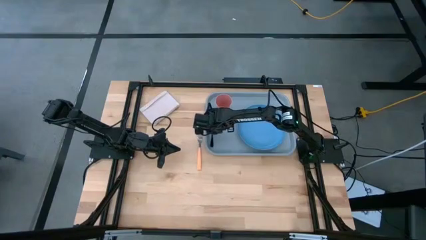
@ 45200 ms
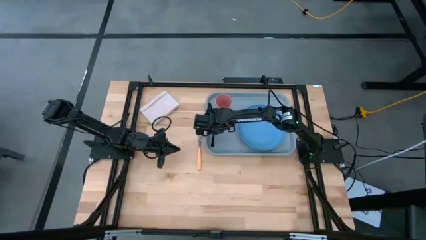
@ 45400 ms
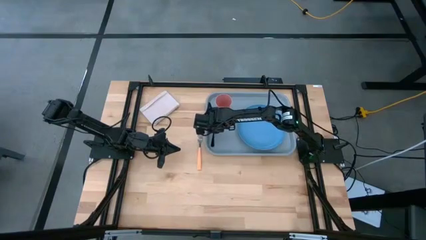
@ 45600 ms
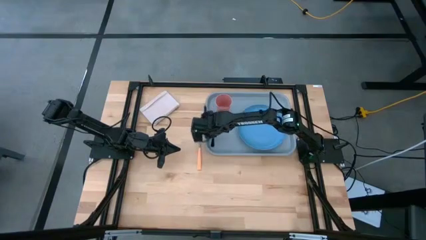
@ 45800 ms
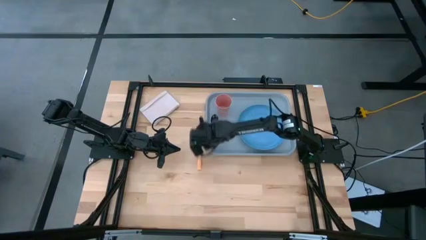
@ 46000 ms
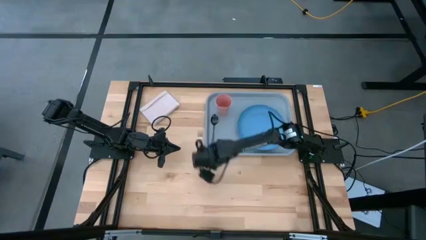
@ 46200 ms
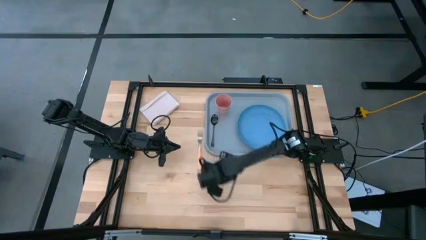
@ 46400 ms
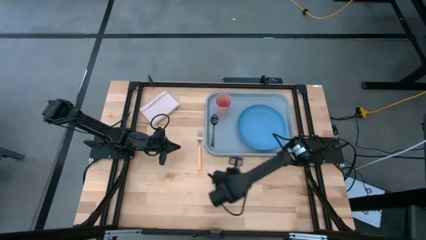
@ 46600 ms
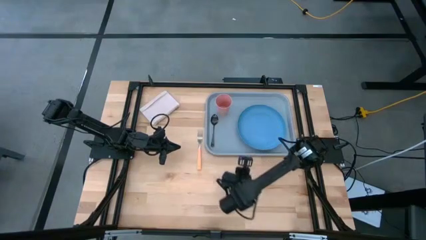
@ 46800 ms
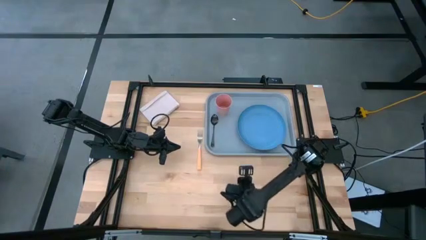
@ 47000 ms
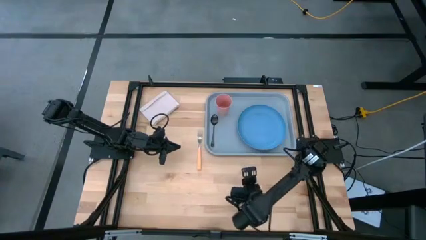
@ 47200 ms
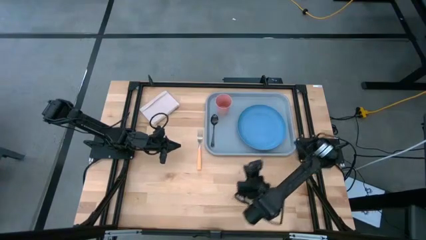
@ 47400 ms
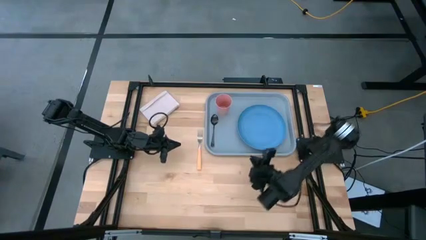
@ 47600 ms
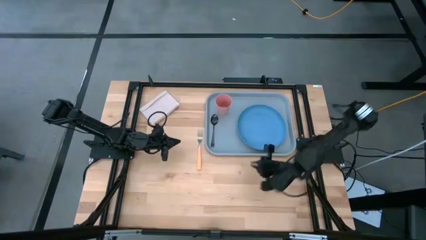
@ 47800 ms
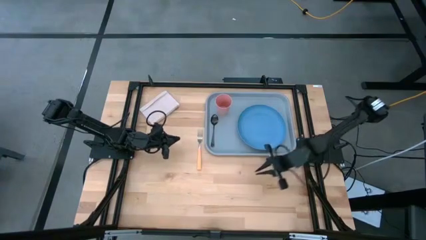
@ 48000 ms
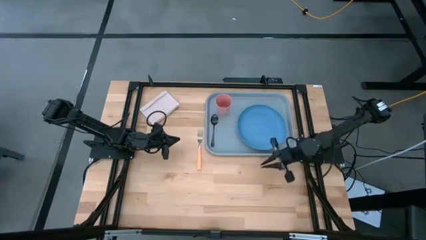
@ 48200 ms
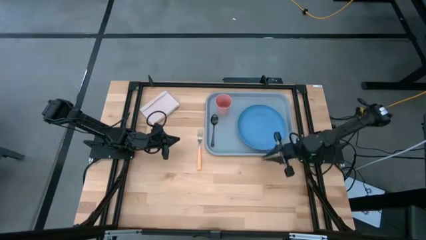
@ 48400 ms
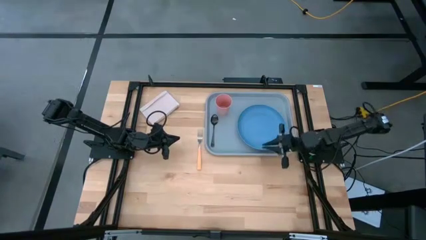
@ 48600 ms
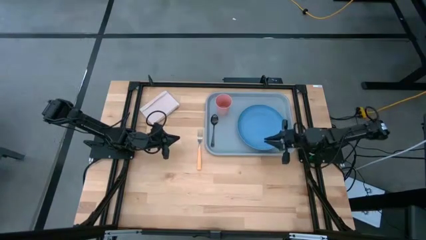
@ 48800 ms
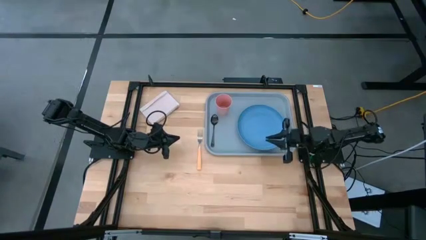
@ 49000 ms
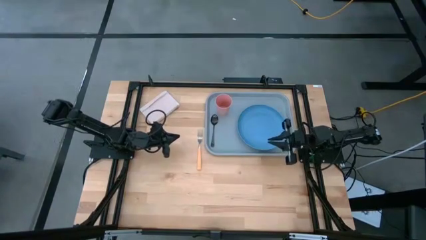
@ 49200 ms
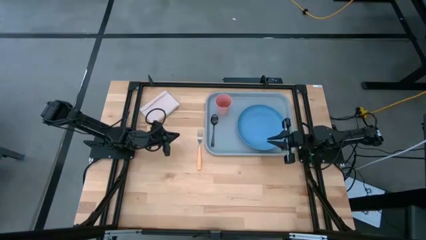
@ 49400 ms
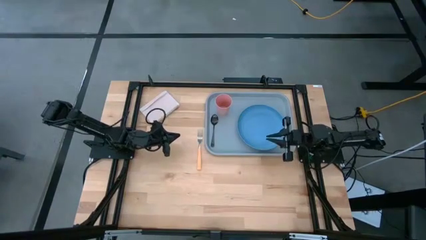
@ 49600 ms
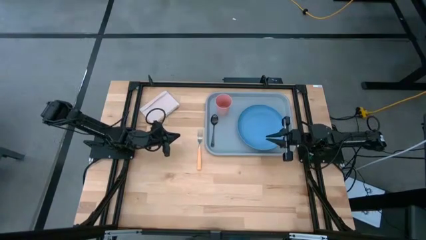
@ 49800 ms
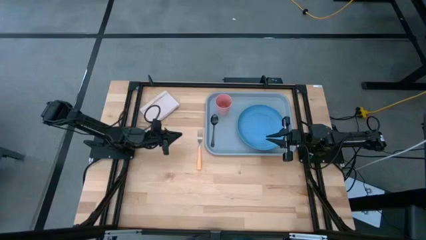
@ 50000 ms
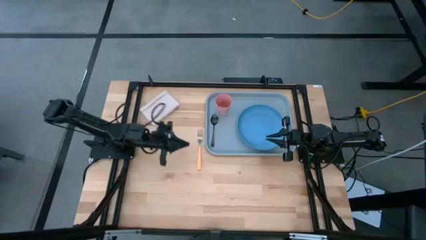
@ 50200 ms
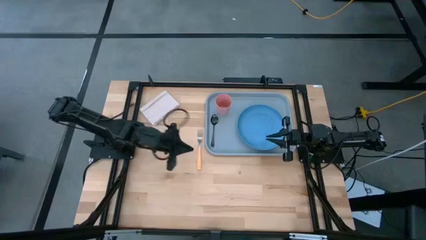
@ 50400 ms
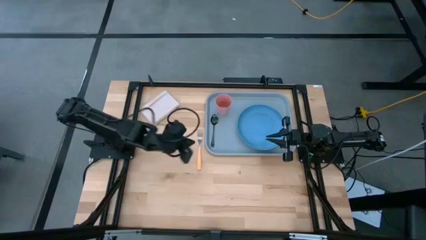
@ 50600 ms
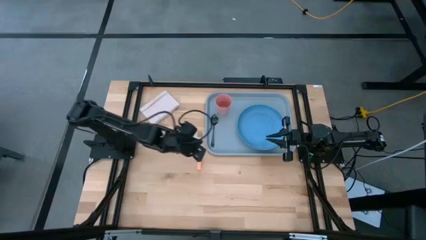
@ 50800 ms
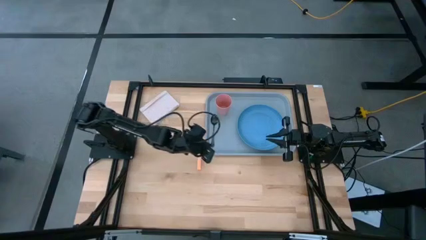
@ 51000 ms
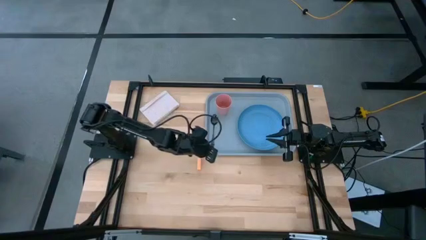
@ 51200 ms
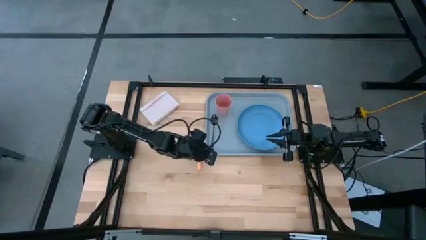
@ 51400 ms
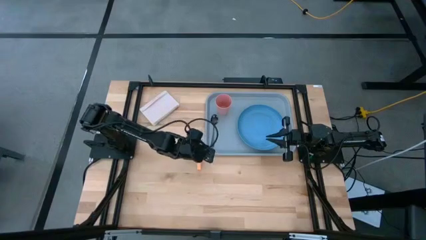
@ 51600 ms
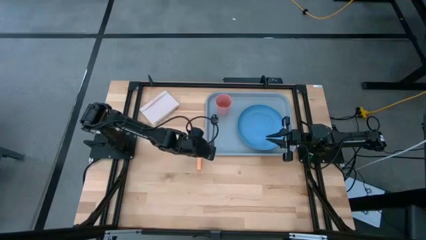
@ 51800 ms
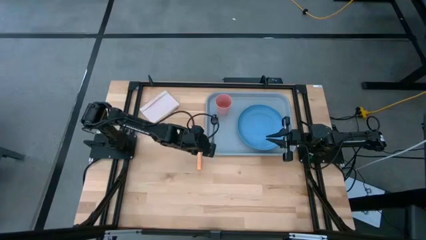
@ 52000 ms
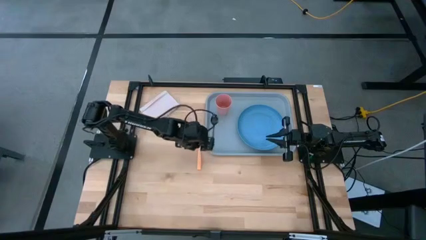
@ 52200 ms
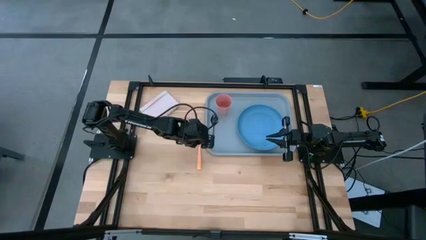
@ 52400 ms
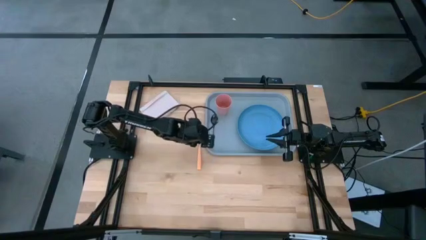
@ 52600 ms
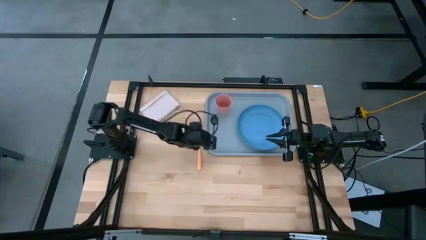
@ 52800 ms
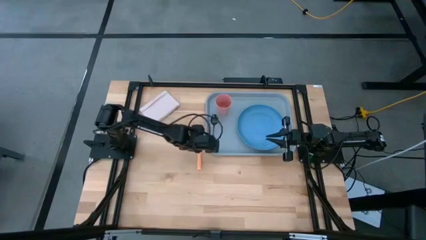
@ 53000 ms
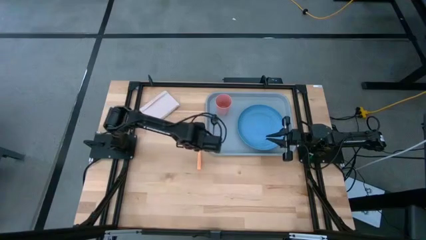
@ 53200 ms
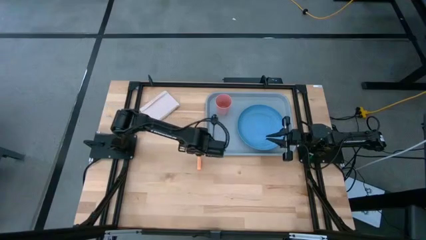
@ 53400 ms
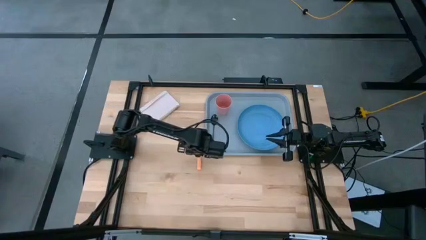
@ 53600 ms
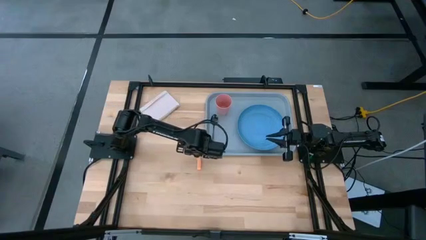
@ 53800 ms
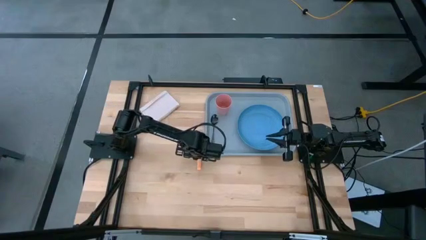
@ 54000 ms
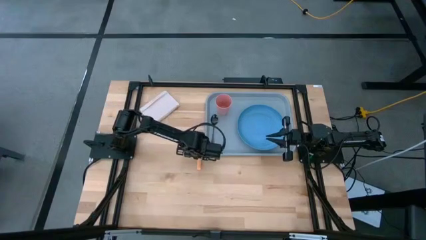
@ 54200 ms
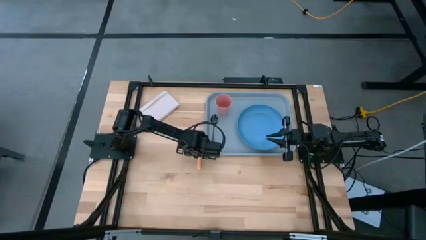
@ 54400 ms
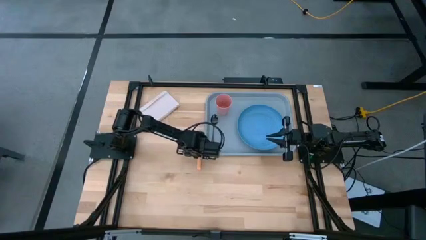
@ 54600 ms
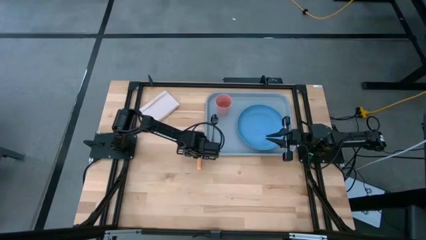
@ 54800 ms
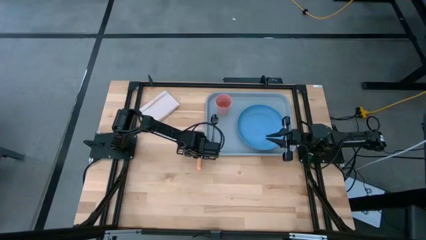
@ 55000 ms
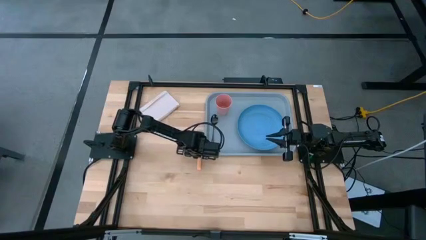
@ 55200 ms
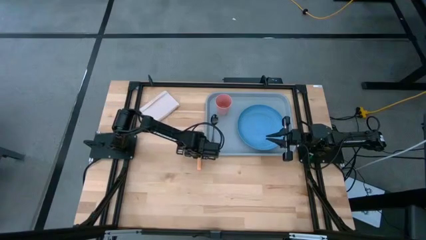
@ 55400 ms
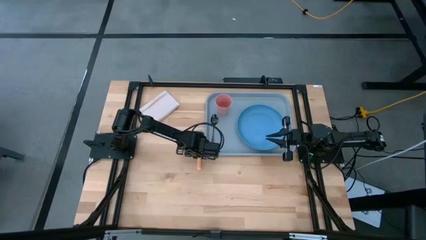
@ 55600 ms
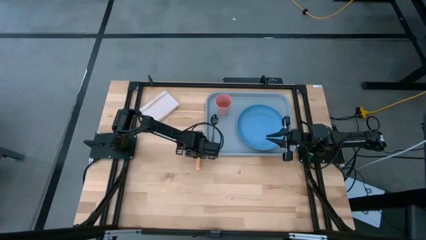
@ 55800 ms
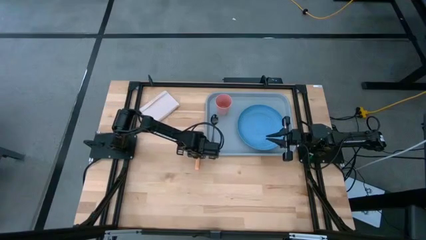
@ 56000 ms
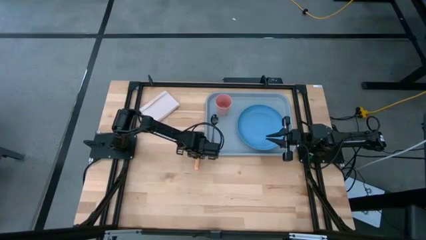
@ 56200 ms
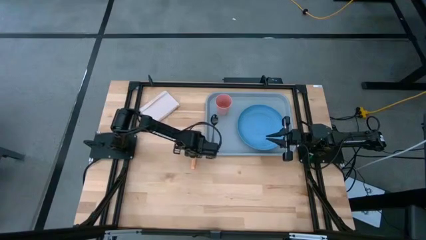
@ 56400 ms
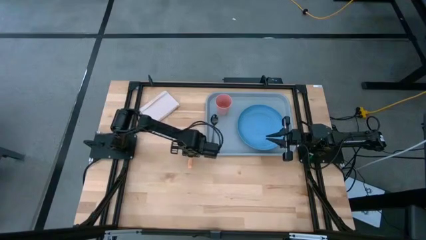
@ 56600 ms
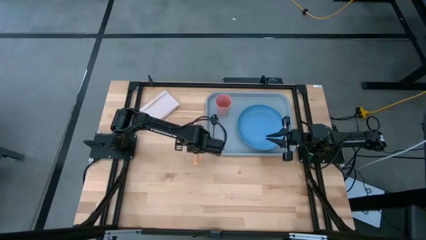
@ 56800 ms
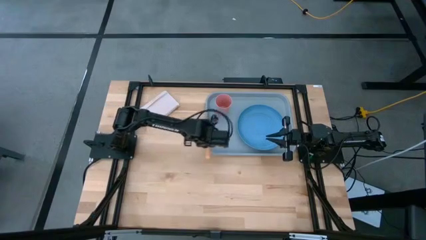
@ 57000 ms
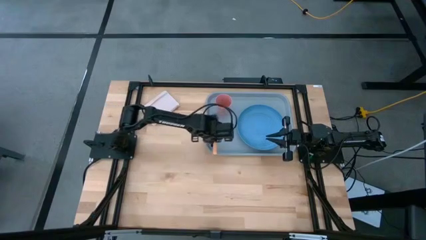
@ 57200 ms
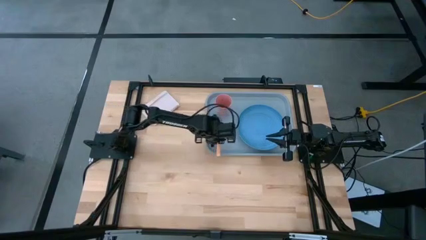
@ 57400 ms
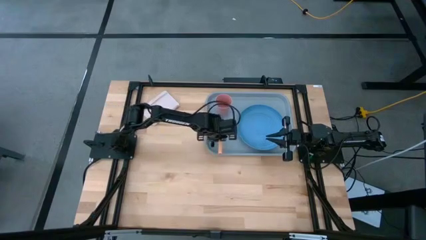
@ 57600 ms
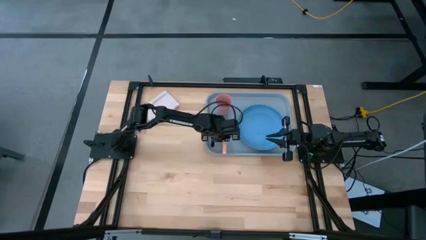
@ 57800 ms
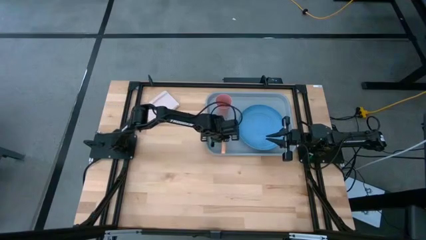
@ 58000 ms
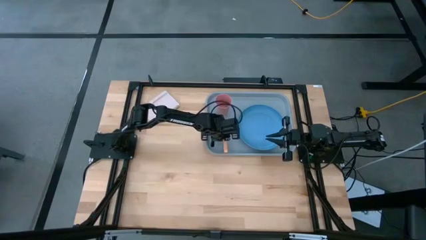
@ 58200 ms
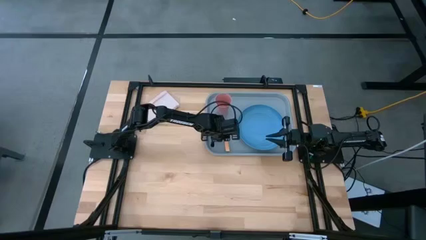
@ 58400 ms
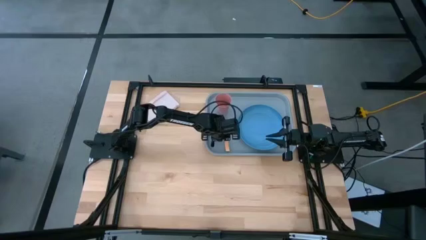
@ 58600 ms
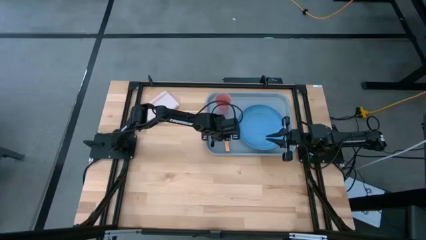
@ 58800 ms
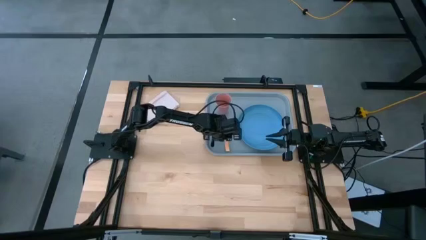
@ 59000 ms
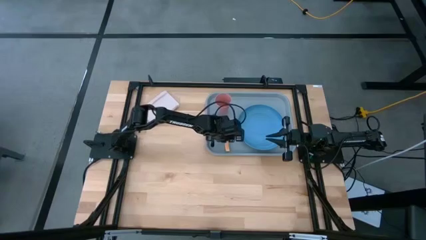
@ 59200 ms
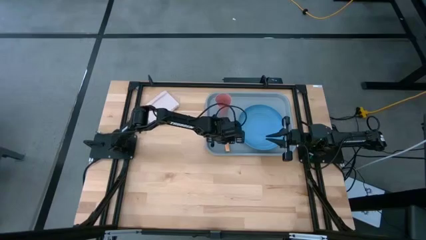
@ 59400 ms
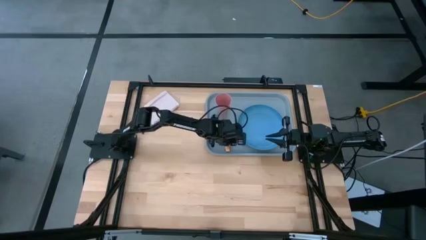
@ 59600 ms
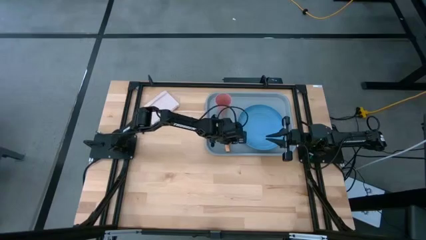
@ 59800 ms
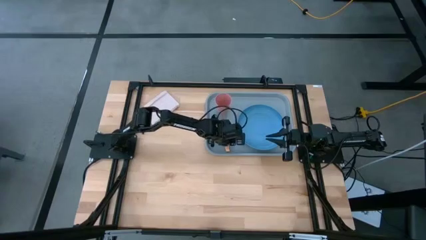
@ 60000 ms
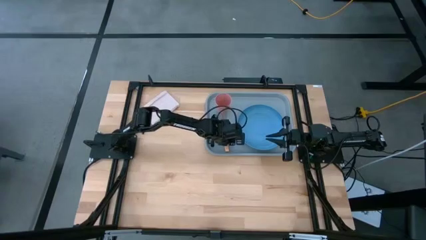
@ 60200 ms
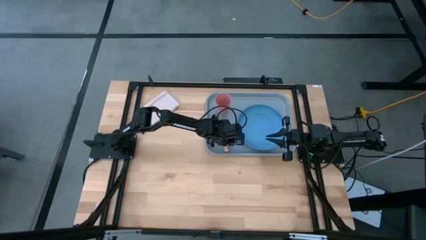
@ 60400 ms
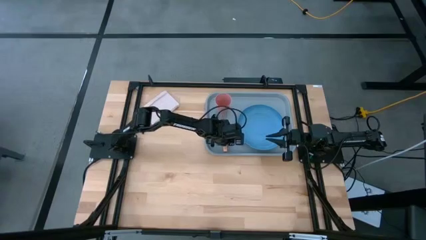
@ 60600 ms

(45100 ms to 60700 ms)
Task: Pick and place plate/cup/fork/spoon on tray
Put the yellow fork on the gray serving tray to the right of the black spoon
